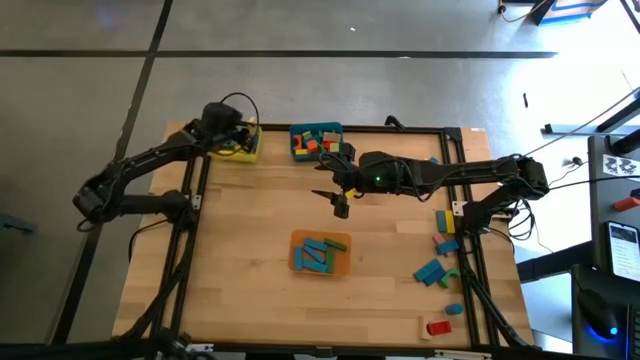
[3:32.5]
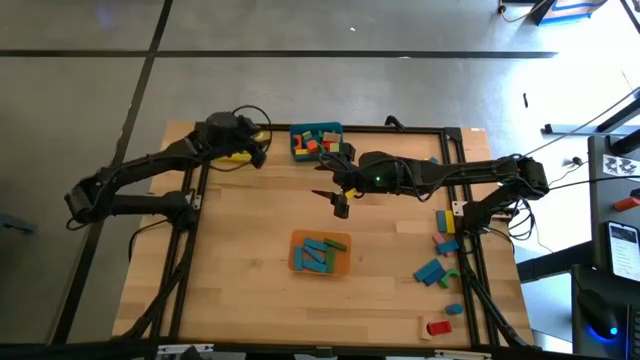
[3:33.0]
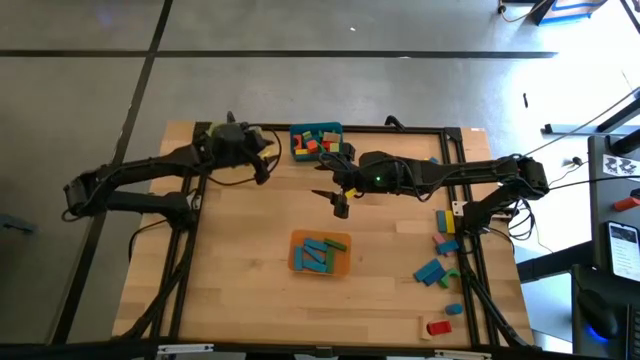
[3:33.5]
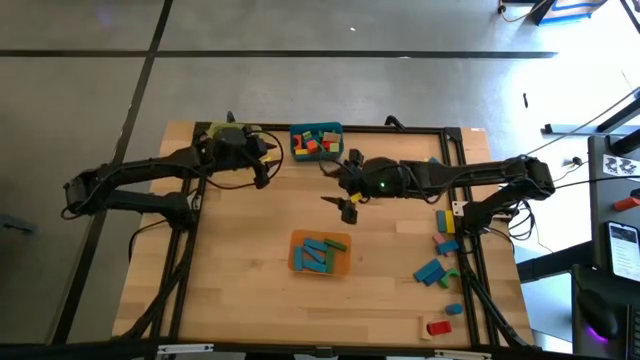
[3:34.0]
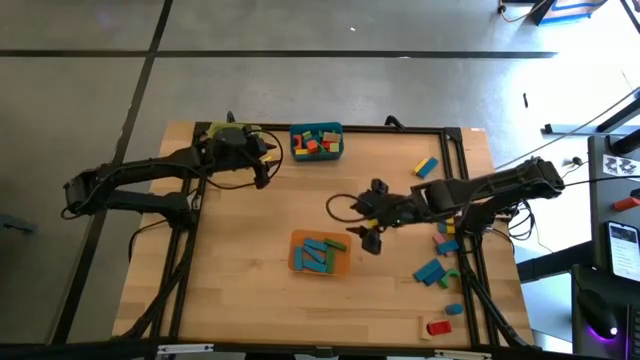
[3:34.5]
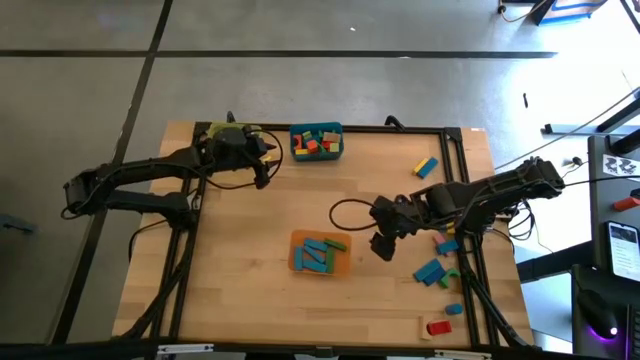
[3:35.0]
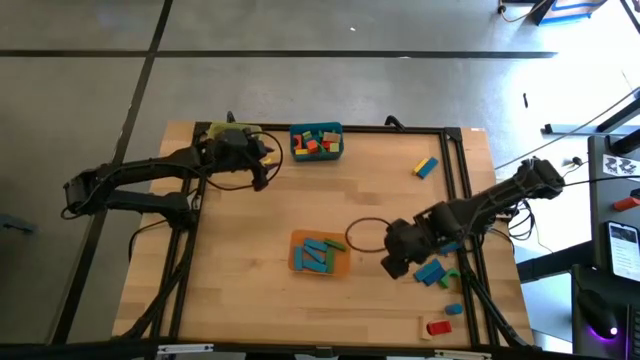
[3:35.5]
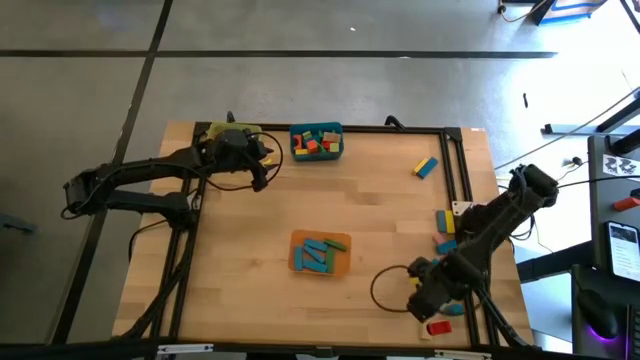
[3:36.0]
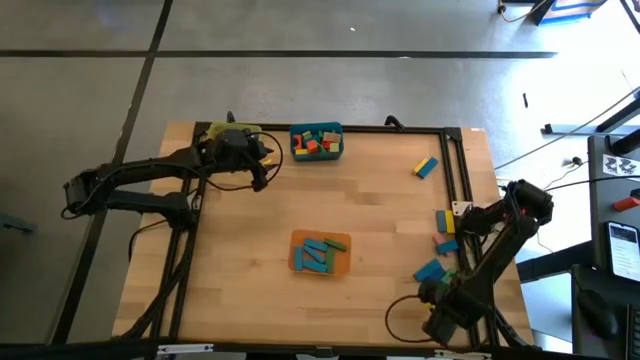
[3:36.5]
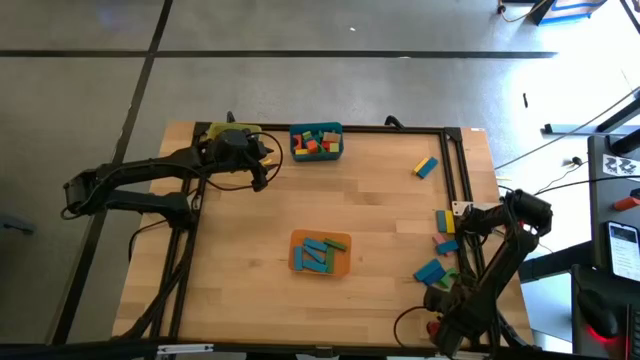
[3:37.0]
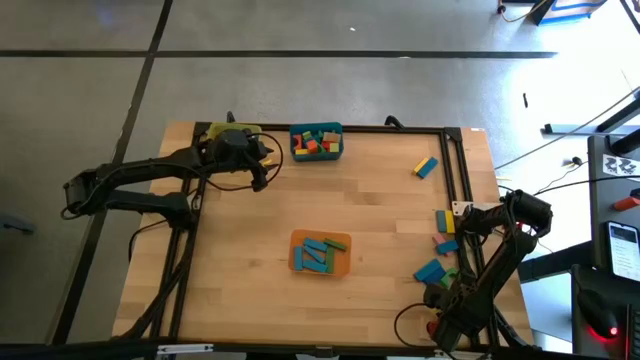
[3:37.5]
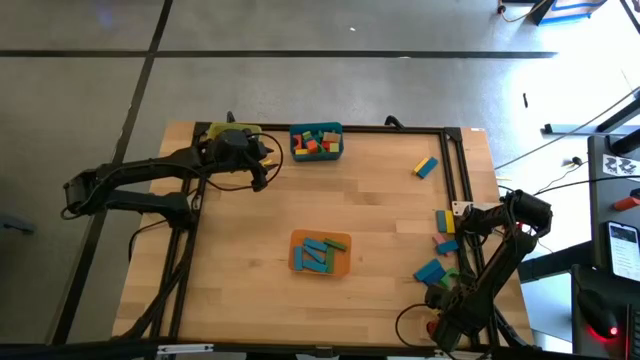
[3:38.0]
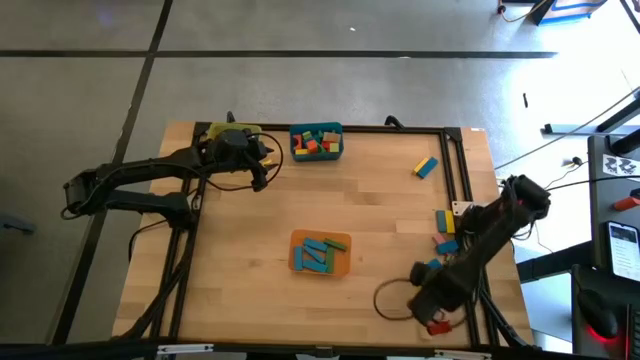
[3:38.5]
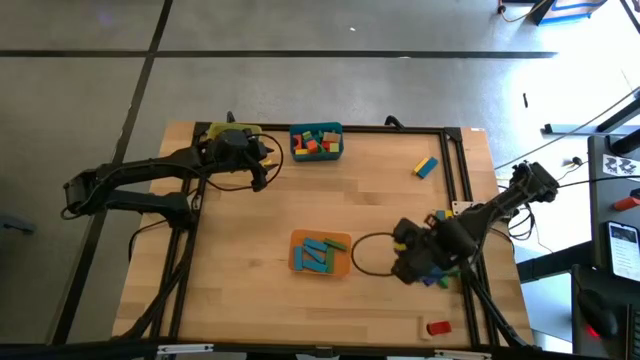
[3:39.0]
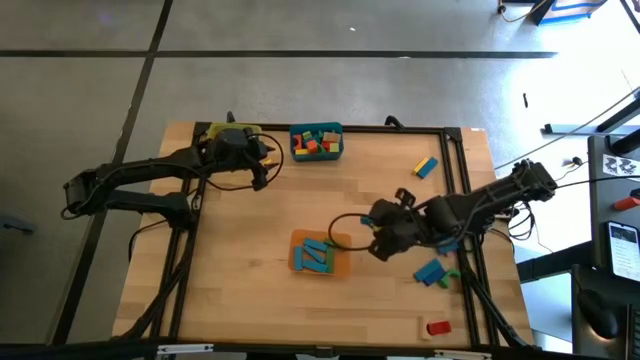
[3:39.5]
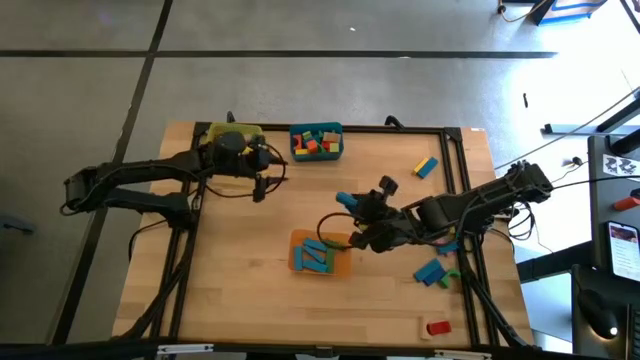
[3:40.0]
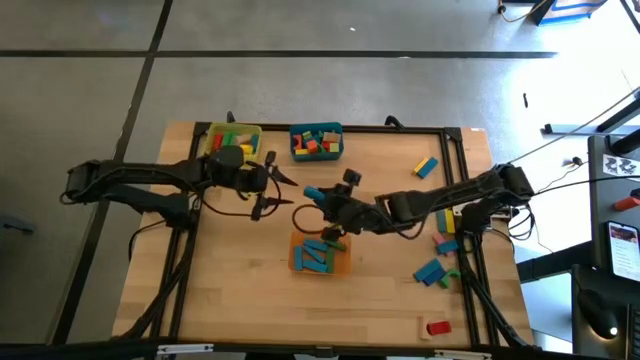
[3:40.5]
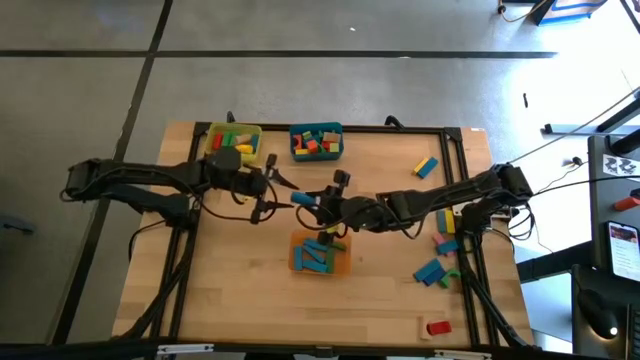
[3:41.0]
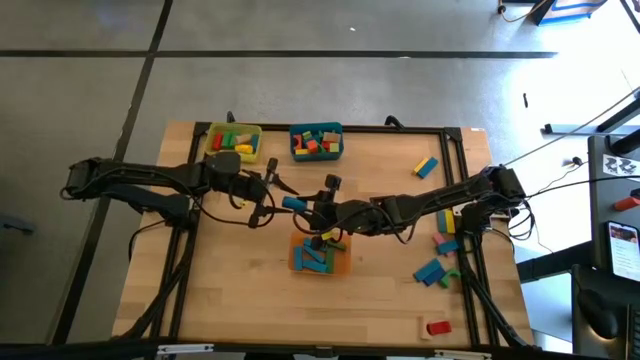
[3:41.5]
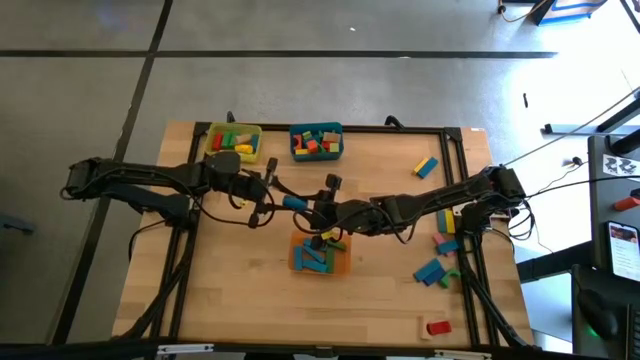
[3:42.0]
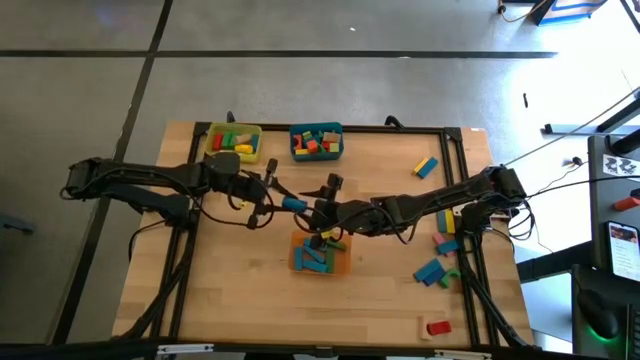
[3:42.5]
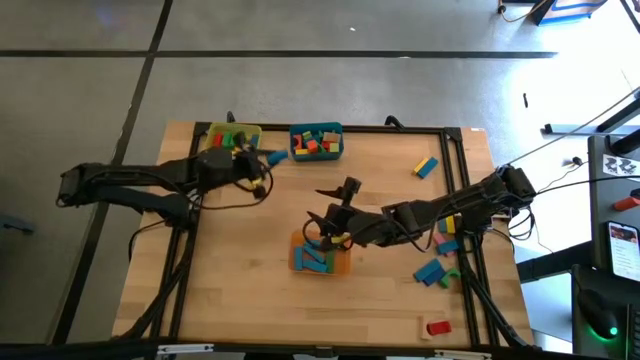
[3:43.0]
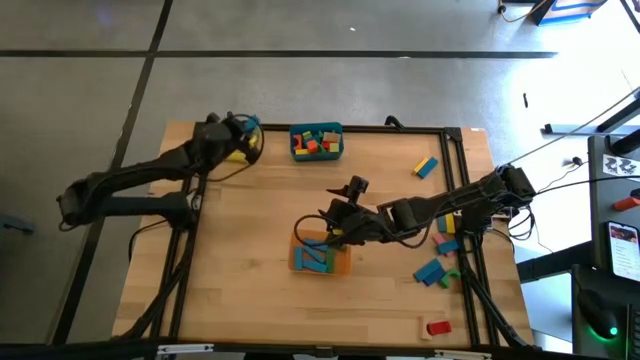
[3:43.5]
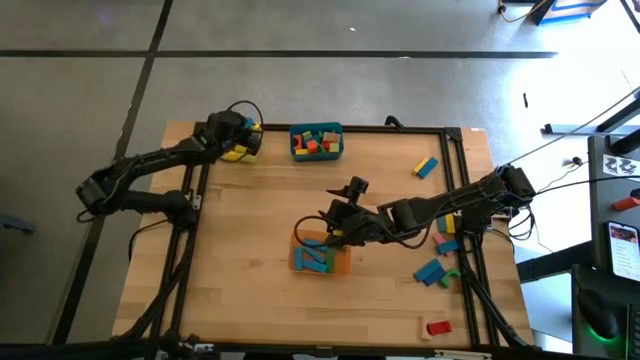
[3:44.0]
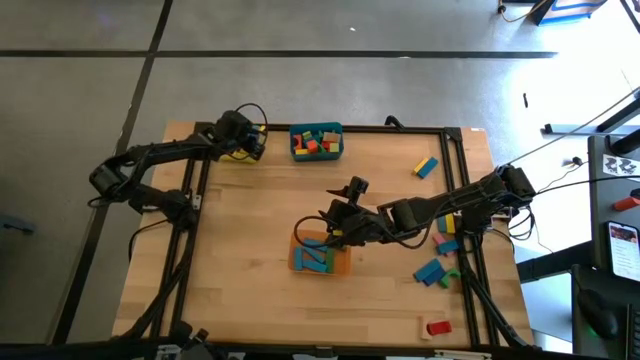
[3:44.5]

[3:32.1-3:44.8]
Task: Sort blocks by size
Put the blue cylindrical block into the yellow bin

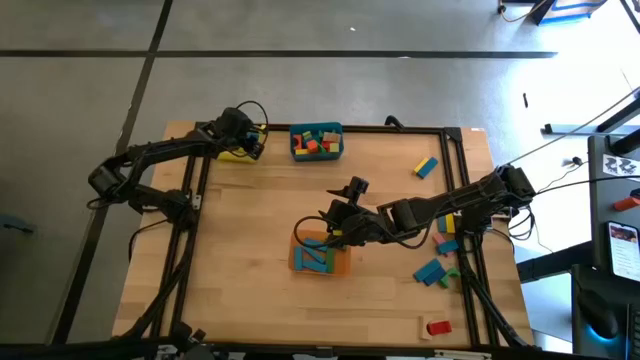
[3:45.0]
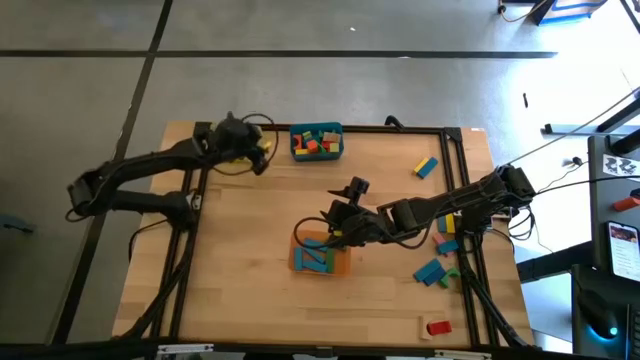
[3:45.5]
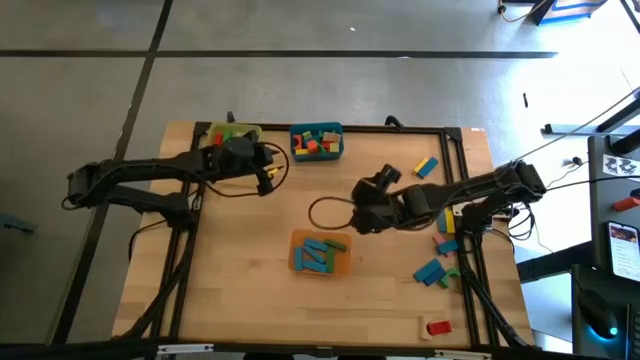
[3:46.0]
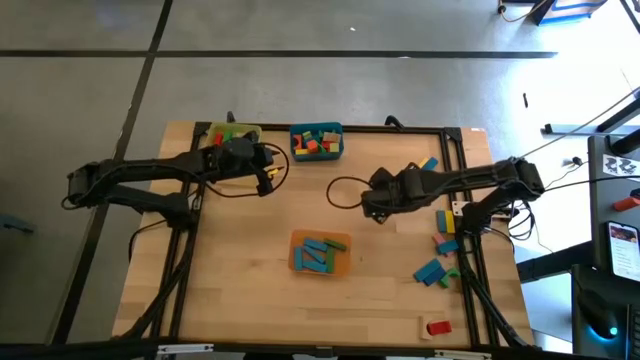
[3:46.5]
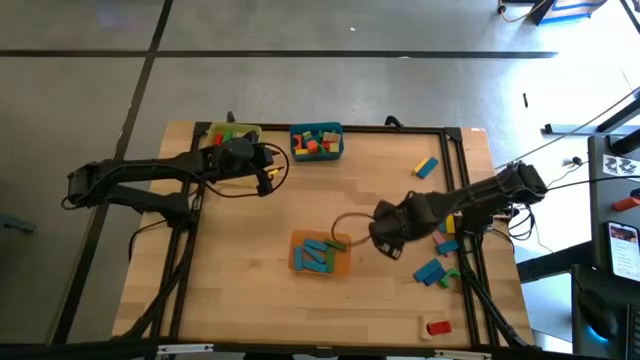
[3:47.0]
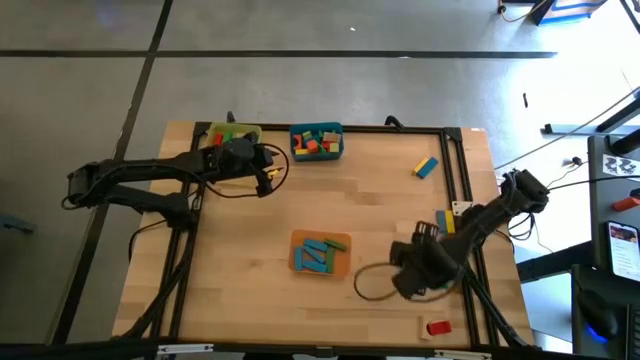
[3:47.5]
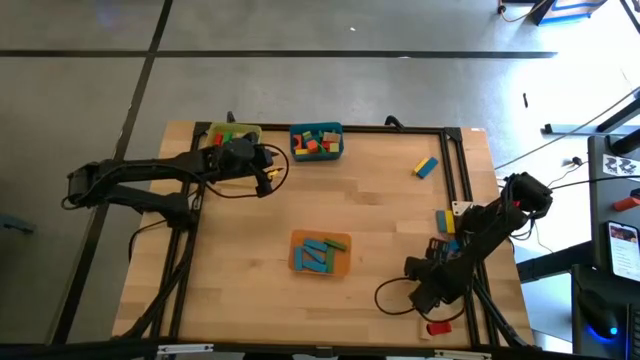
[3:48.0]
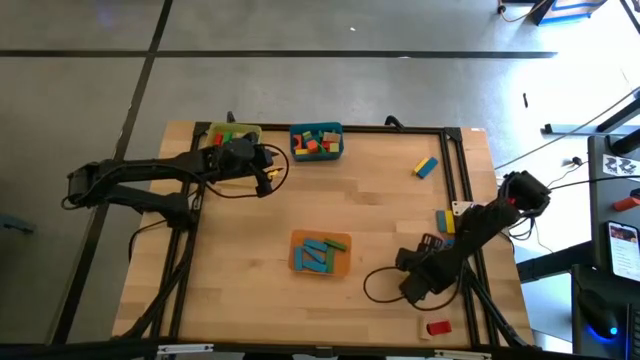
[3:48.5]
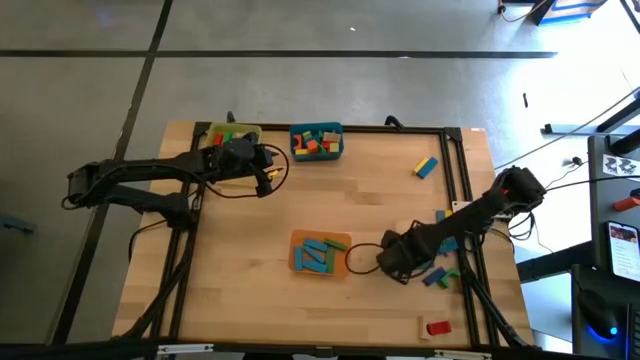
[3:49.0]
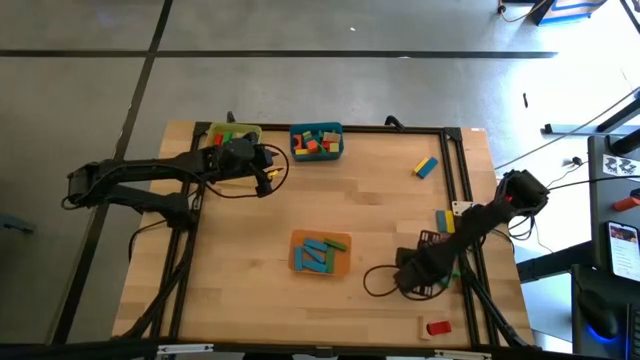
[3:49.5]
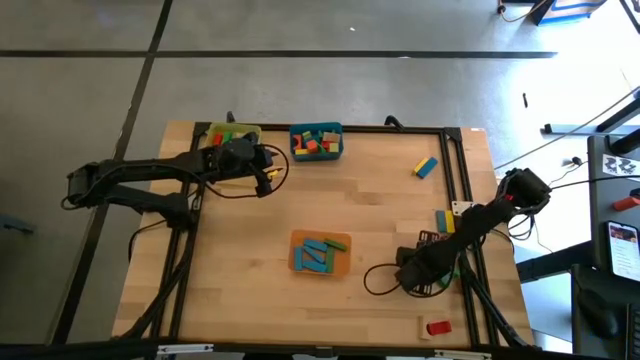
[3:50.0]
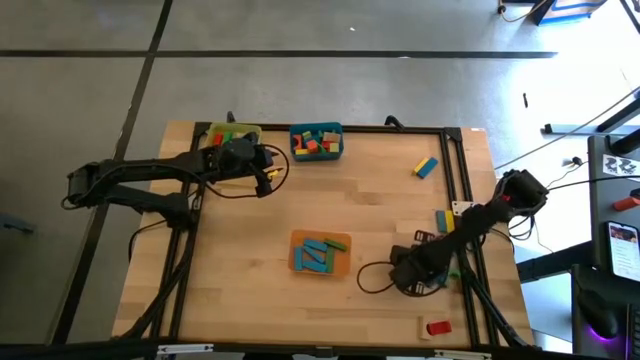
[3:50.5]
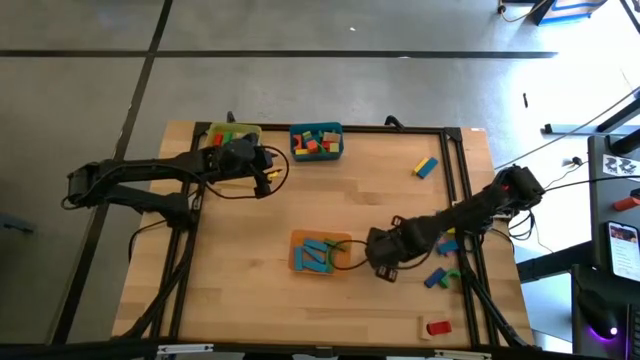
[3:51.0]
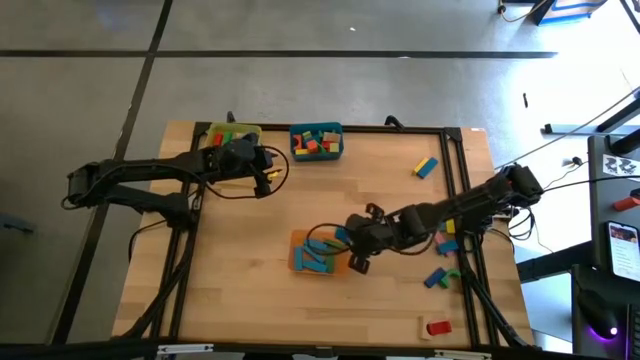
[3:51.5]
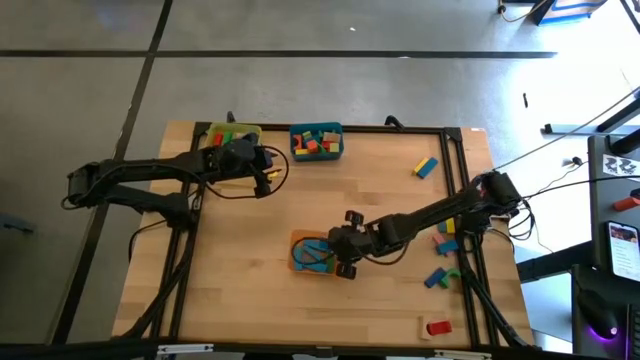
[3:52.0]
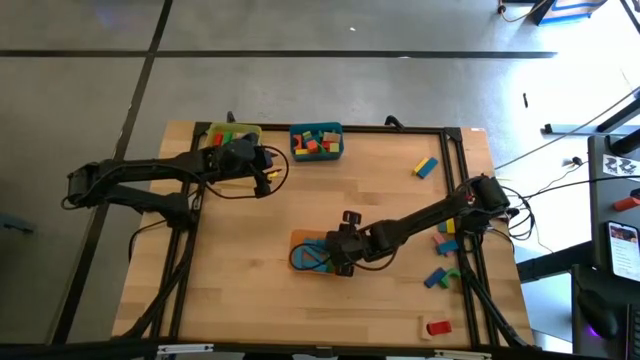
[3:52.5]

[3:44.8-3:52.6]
Put the blue rectangular block into the orange bin

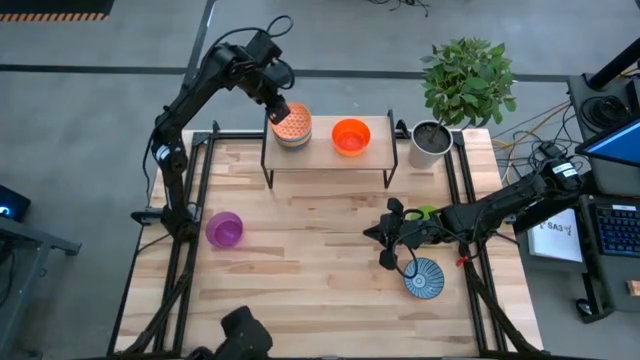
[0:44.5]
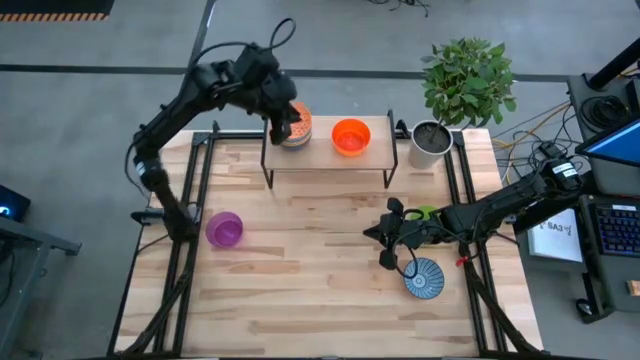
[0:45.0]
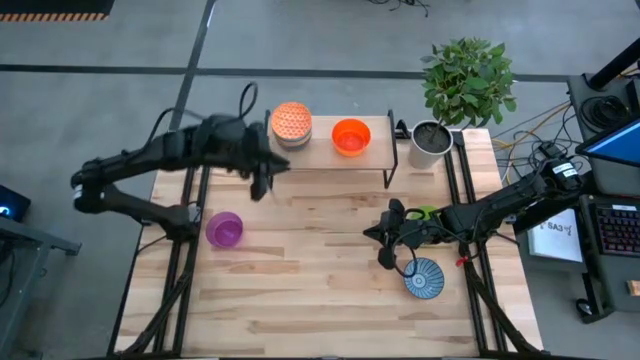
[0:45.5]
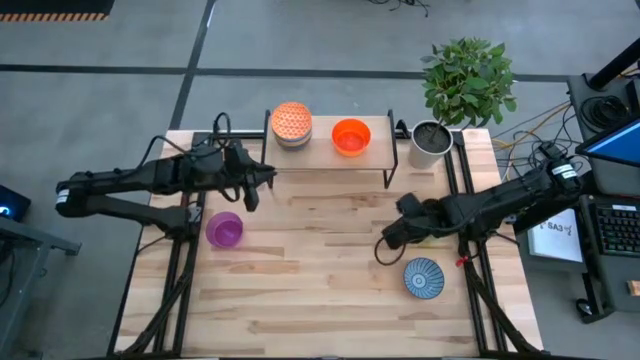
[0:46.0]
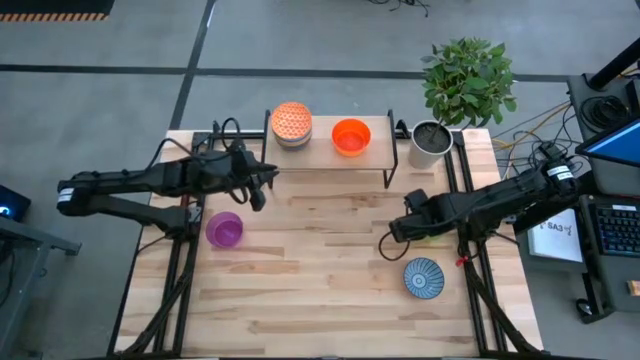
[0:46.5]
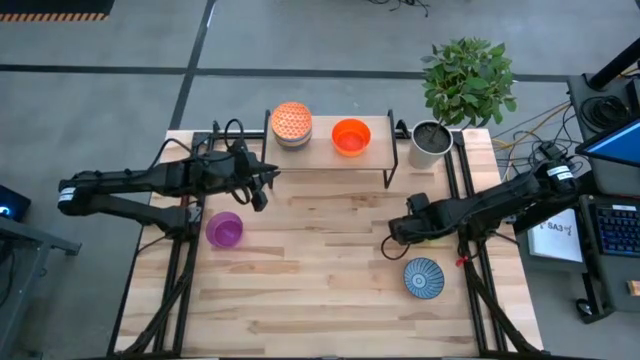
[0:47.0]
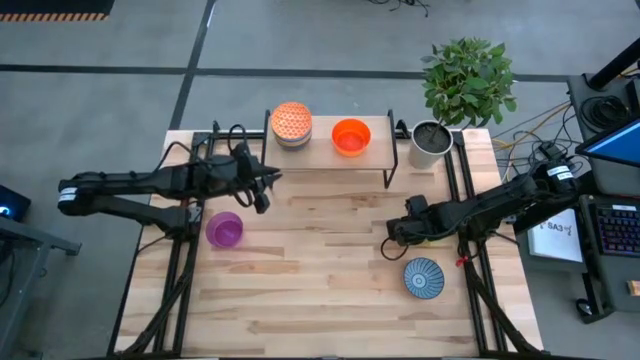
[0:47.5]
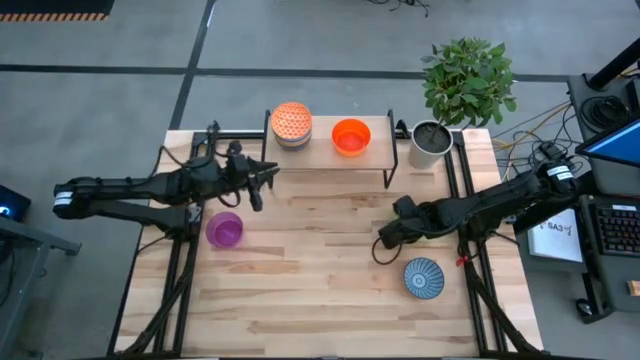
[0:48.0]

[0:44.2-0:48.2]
Task: Place and stack bowls onto a shelf
Stack the green bowl on top of the orange bowl on the shelf
